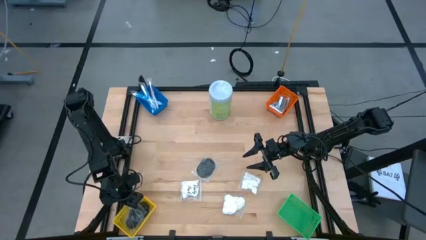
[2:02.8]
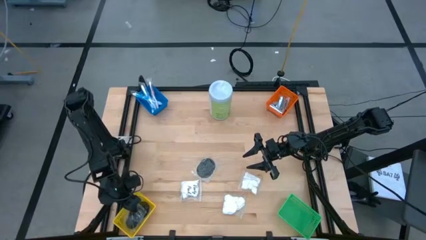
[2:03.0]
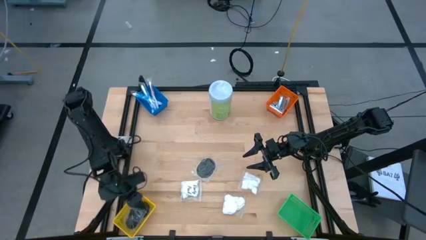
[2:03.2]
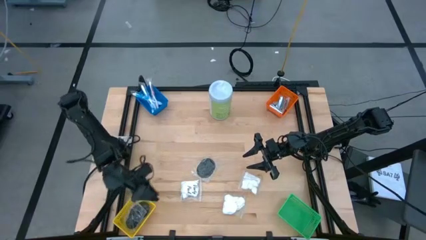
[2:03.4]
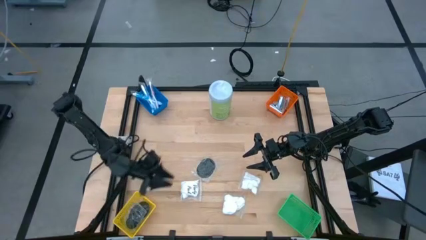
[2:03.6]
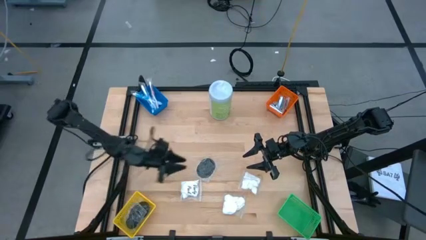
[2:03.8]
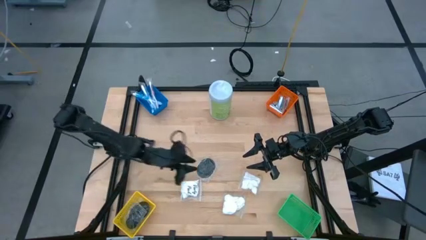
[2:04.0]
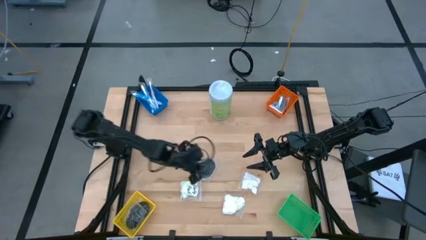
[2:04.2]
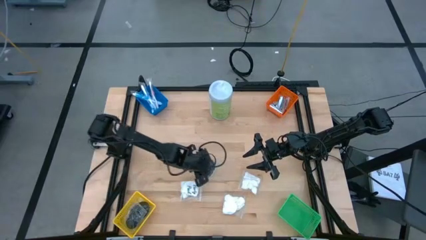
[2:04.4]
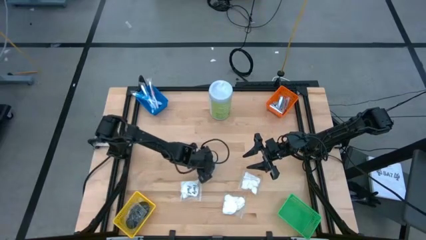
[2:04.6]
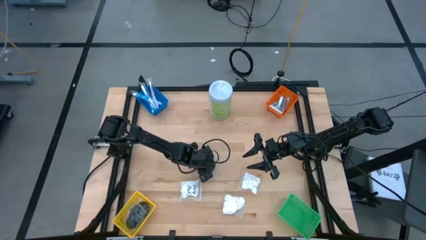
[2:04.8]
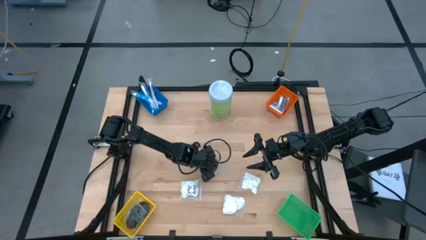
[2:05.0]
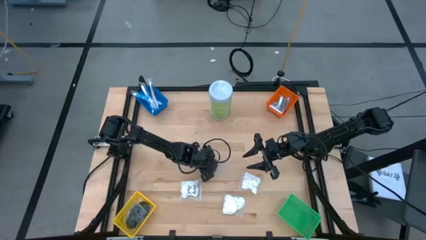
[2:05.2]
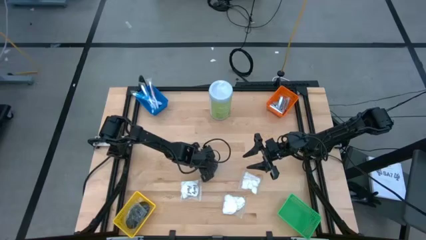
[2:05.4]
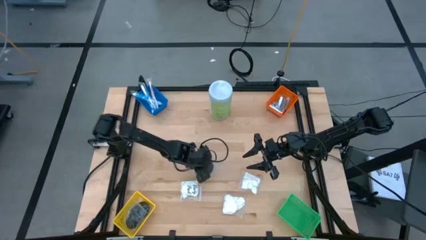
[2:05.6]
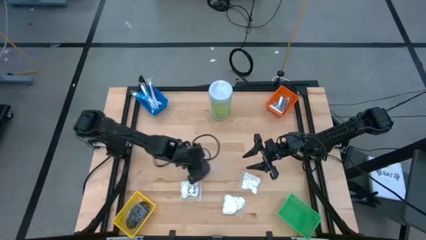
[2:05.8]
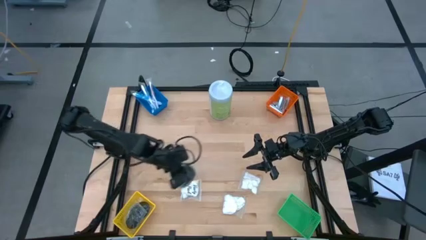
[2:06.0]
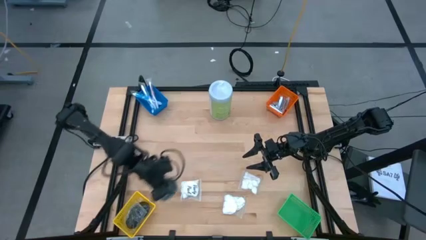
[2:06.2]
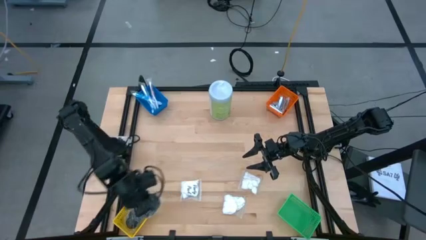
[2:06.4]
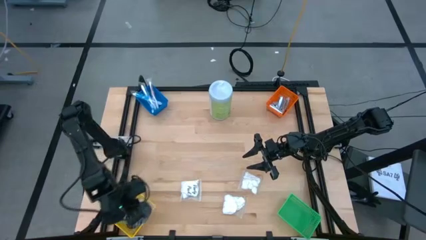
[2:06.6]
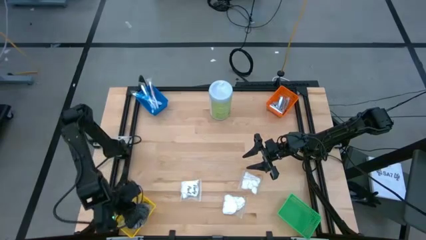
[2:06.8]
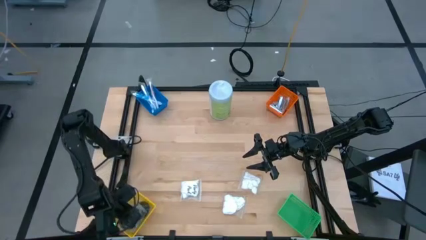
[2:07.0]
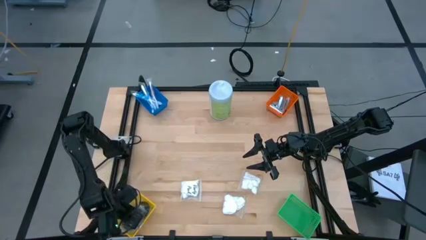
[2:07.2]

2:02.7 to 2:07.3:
Task: Pick & Place Travel size toiletries
Put the black hairbrush into the yellow bin

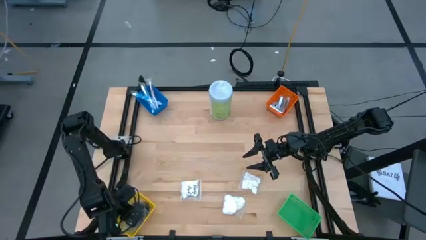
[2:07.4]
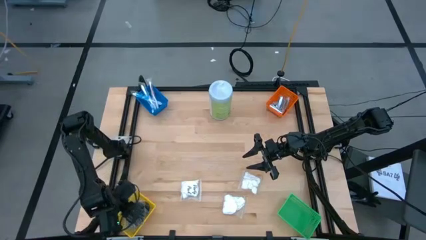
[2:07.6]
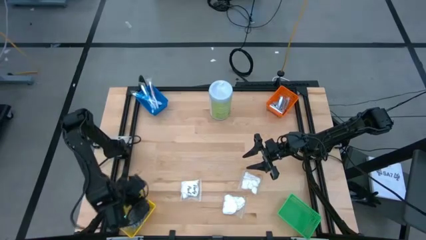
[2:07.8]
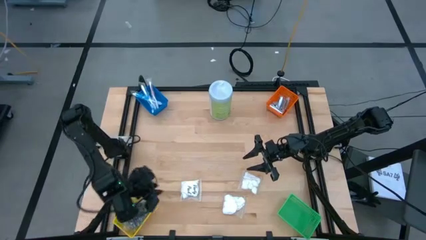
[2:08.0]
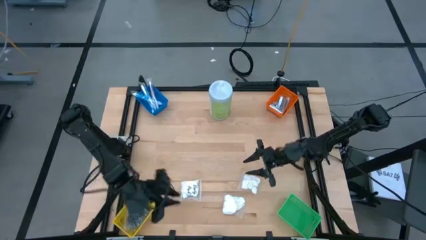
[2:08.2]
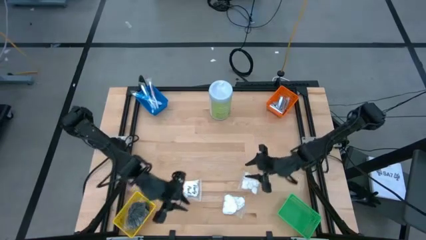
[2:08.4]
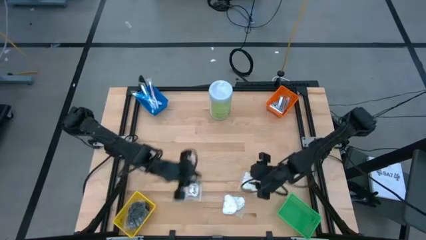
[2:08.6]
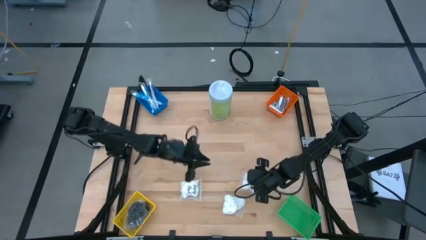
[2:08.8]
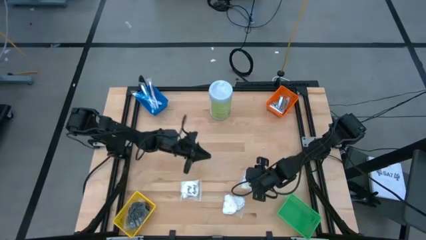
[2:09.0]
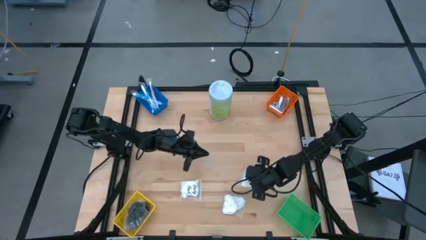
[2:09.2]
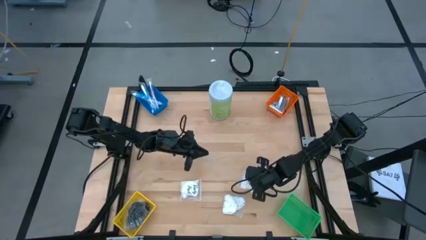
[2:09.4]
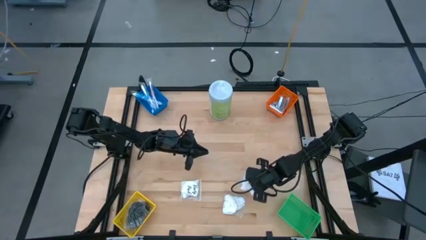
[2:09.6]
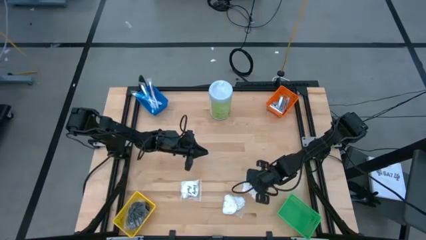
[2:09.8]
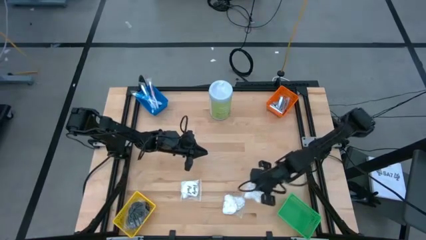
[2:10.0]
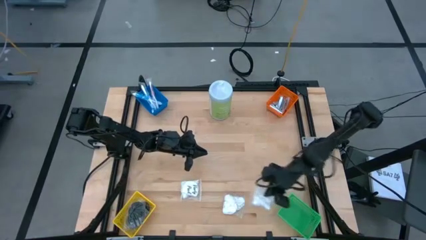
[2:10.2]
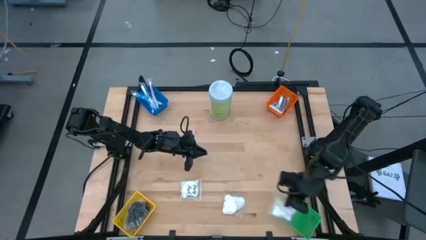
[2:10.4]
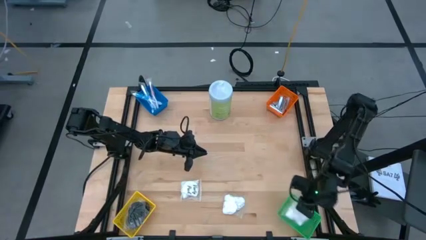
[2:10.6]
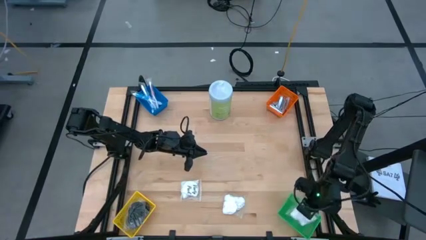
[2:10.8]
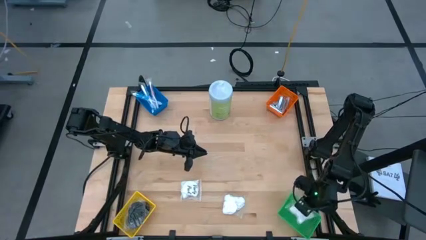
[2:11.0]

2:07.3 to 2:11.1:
Put the cotton pack into the green bin

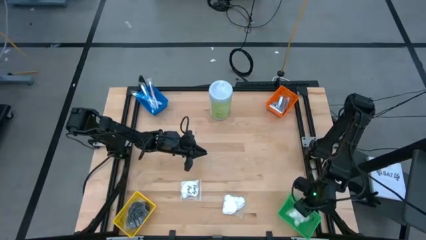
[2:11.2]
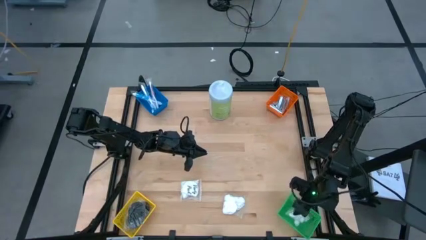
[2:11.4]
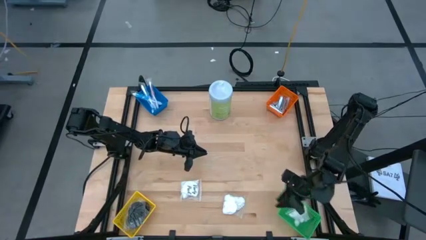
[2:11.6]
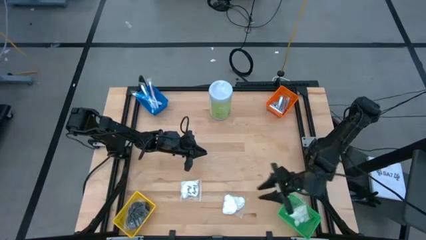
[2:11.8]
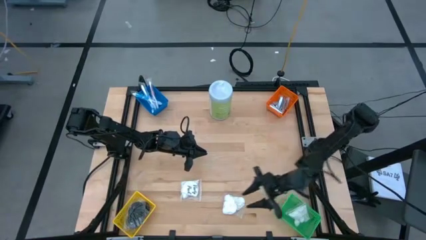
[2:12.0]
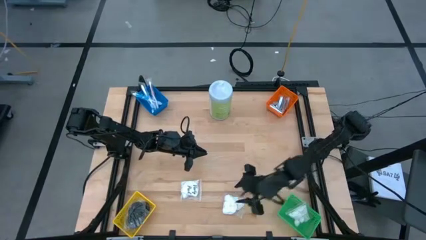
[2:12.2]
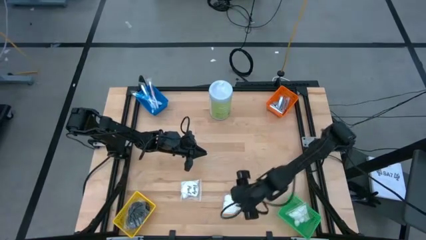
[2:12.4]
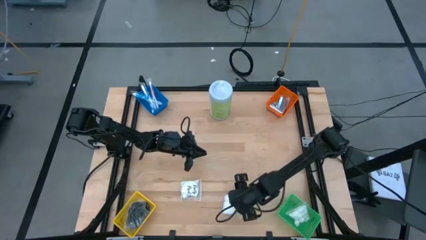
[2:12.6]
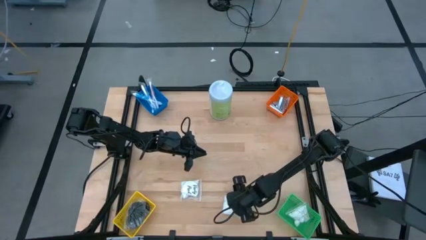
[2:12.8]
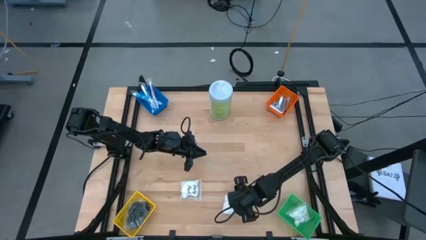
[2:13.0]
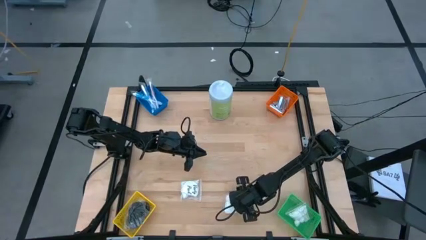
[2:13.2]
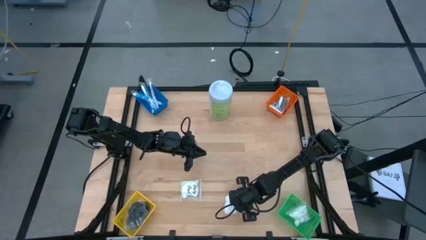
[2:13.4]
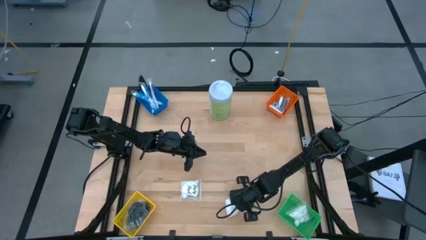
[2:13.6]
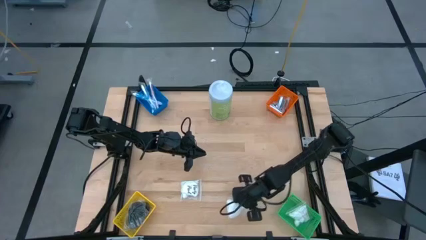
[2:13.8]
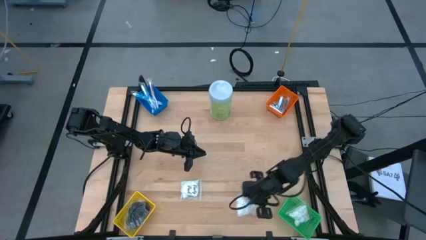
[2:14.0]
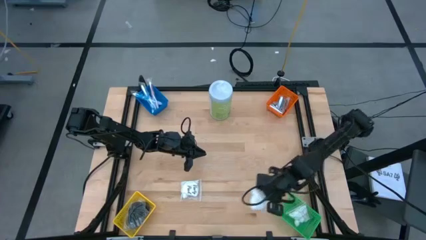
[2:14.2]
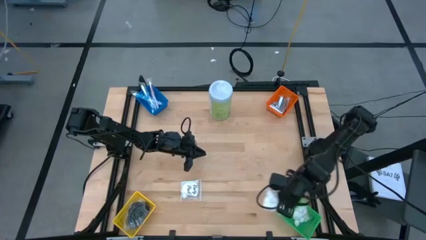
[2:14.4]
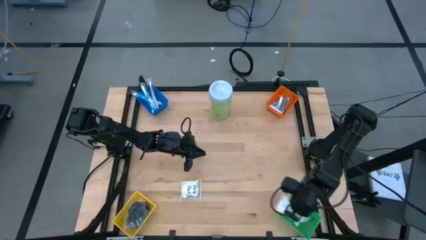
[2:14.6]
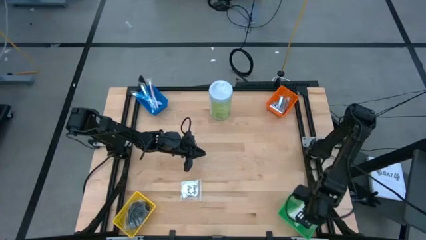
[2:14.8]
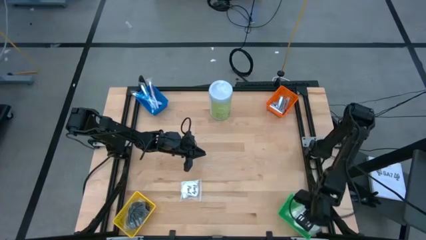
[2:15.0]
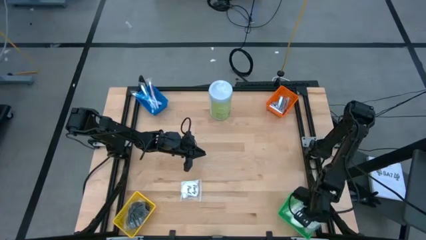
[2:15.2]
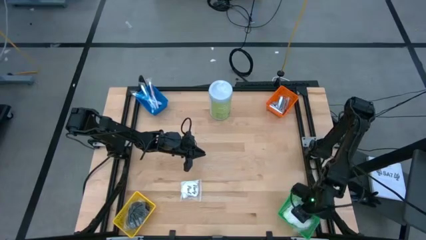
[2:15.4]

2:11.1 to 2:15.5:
Put the cotton pack into the green bin

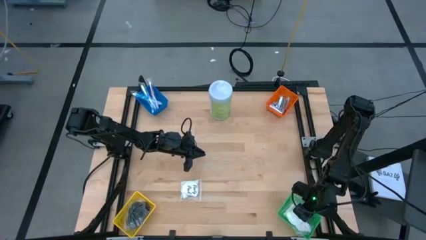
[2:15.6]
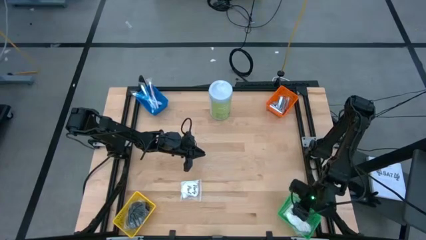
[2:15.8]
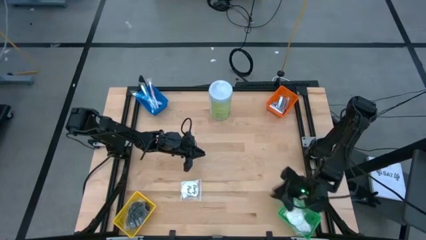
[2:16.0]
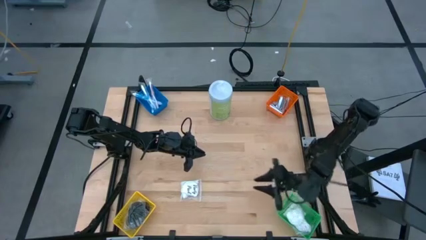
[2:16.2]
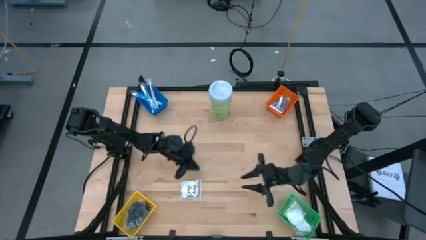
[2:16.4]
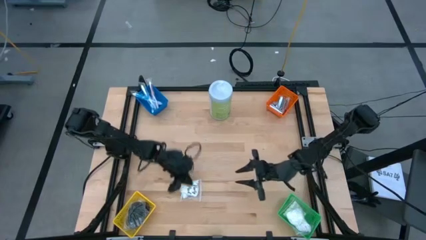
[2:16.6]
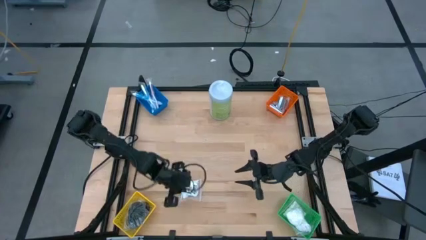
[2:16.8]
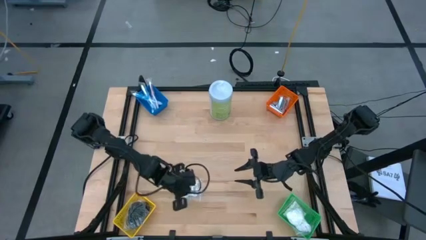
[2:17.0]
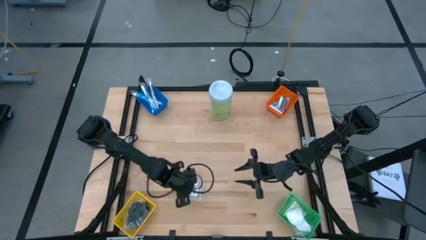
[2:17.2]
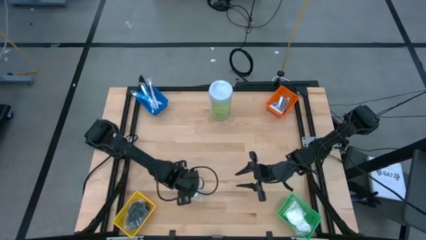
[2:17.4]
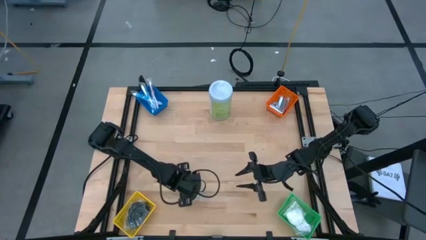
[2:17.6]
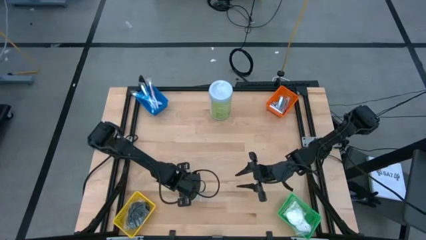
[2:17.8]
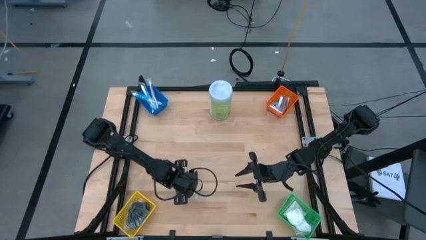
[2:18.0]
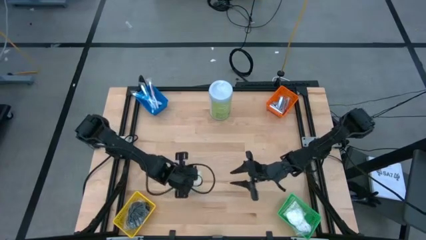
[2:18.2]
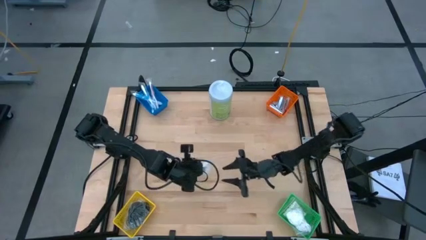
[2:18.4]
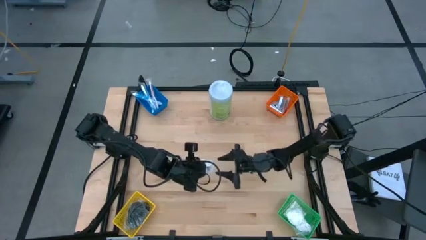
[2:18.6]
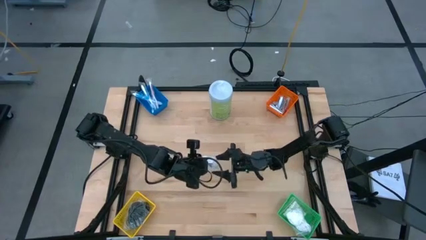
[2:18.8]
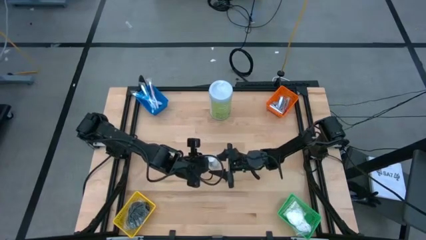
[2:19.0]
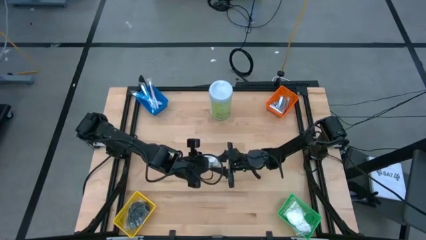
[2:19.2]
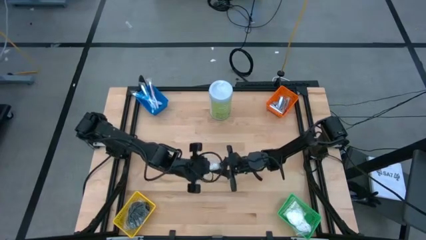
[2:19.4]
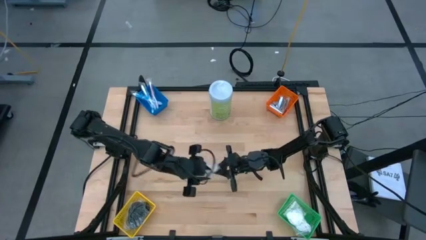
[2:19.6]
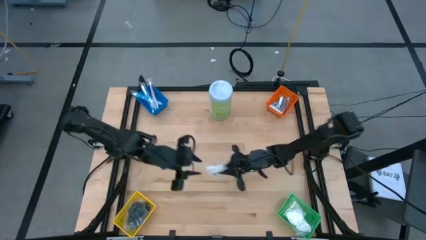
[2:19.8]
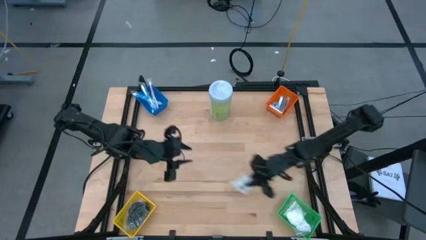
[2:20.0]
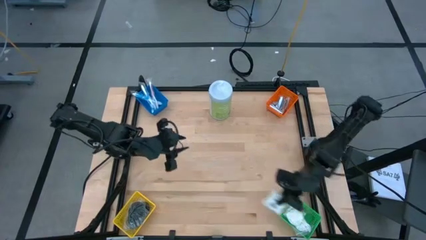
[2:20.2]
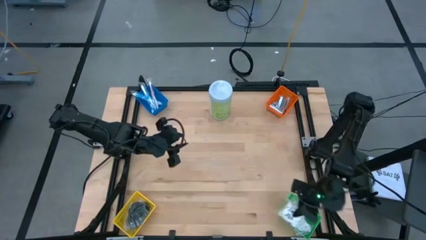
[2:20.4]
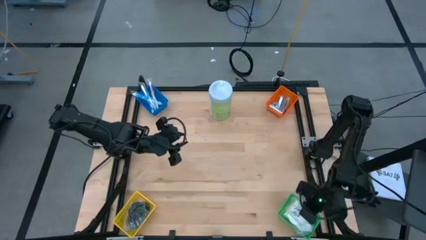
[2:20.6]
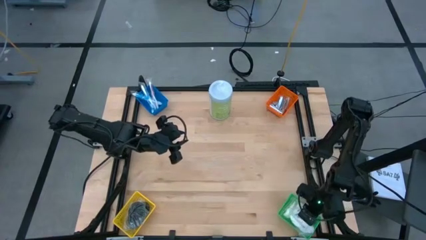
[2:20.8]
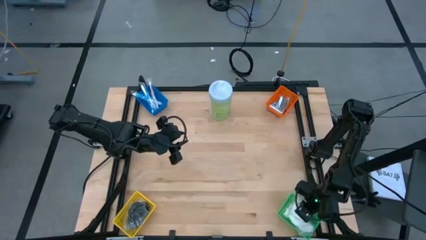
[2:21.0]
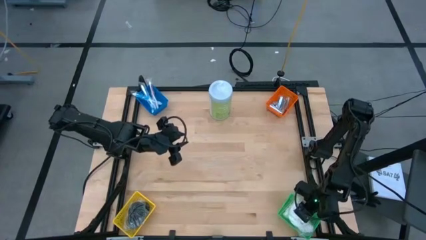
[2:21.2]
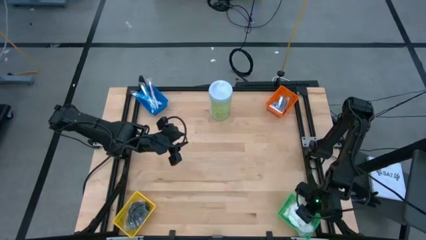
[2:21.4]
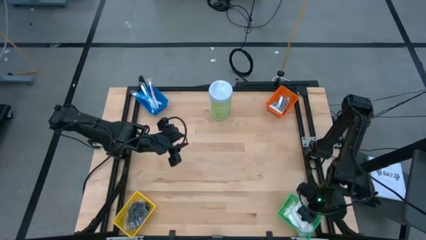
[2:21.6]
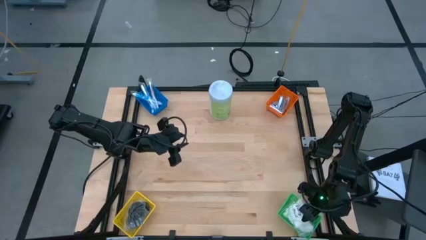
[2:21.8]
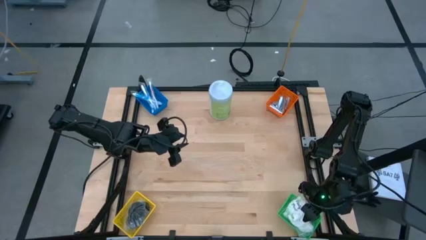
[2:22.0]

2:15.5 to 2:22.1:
Put the cotton pack into the green bin
